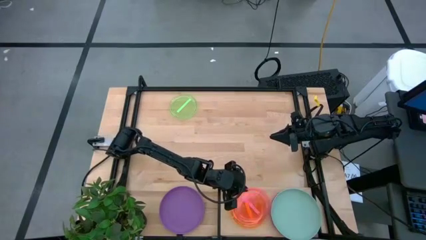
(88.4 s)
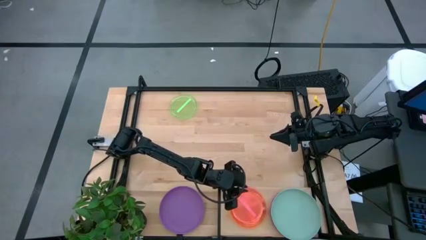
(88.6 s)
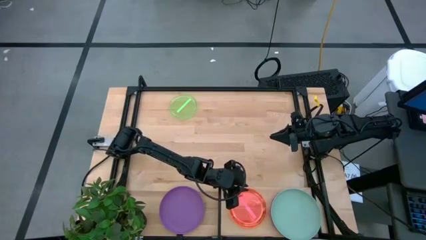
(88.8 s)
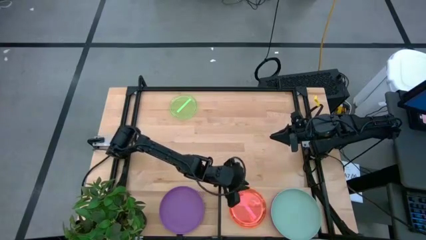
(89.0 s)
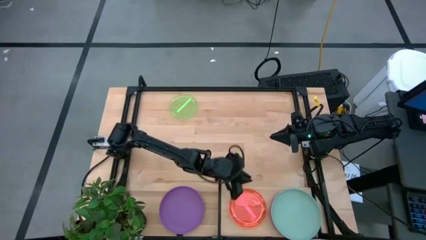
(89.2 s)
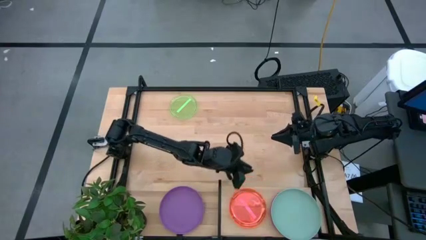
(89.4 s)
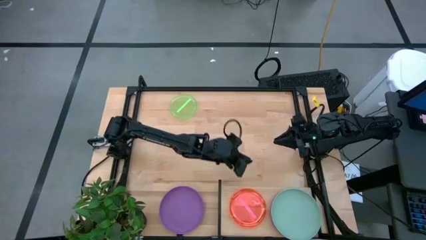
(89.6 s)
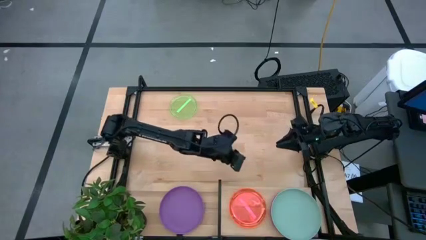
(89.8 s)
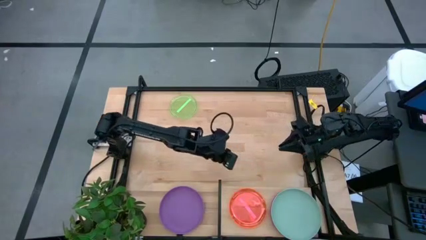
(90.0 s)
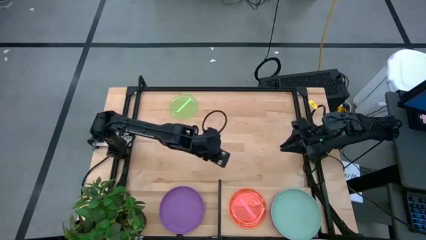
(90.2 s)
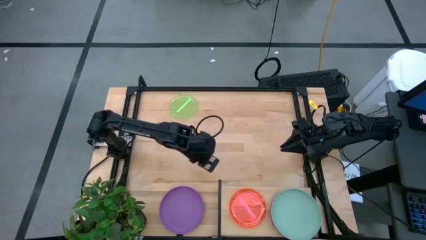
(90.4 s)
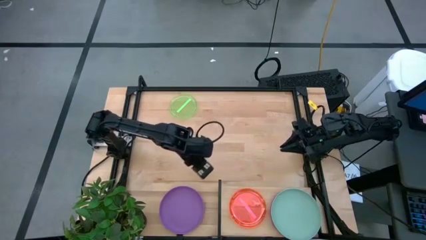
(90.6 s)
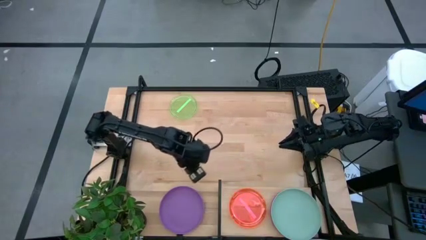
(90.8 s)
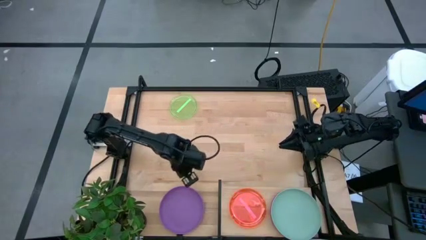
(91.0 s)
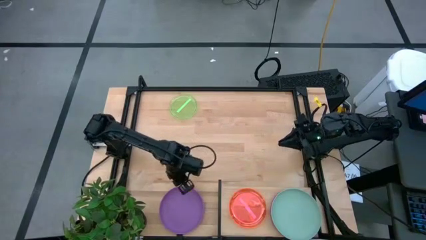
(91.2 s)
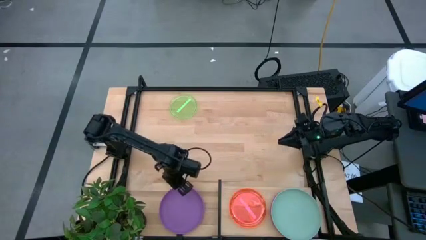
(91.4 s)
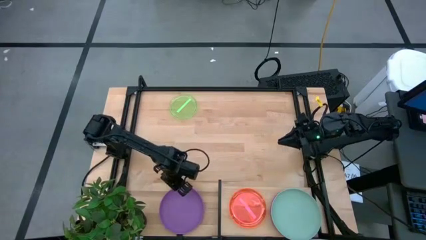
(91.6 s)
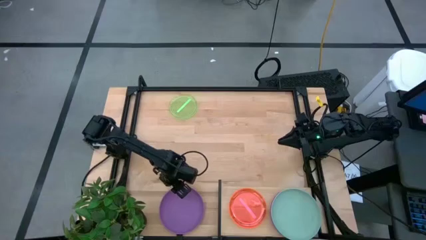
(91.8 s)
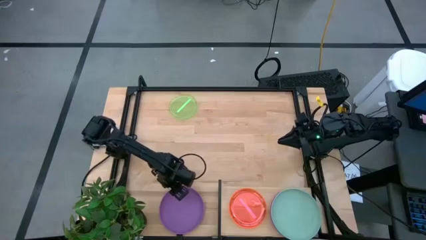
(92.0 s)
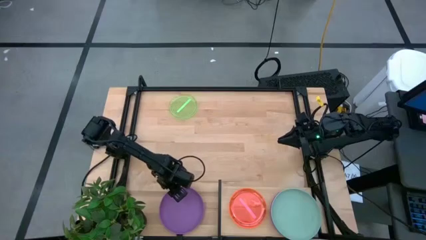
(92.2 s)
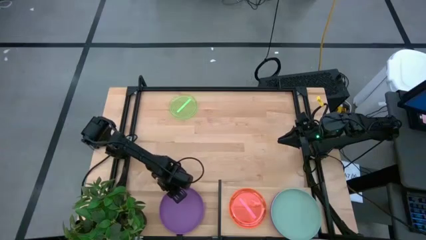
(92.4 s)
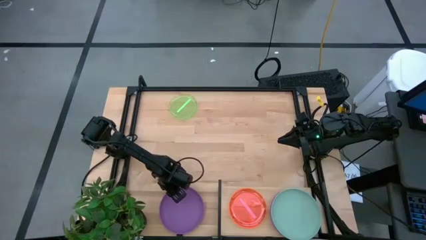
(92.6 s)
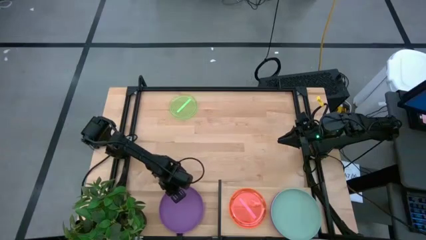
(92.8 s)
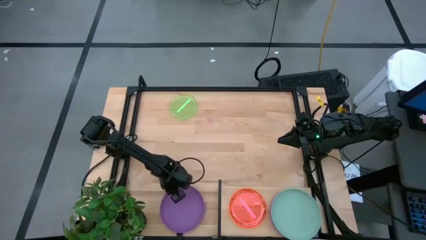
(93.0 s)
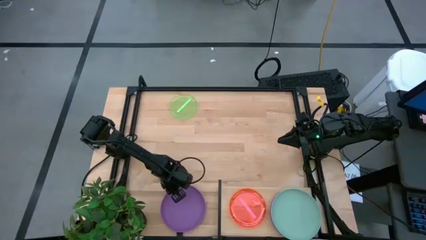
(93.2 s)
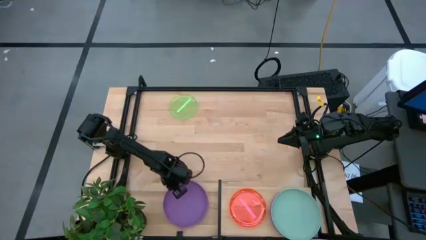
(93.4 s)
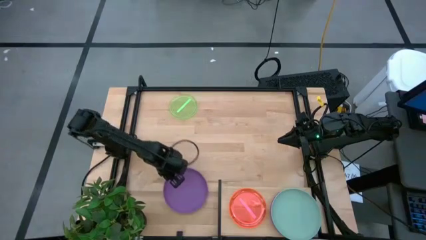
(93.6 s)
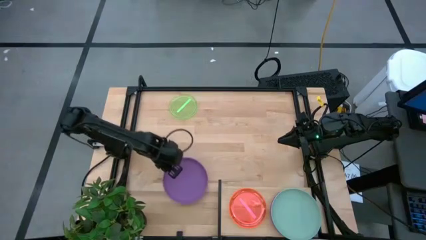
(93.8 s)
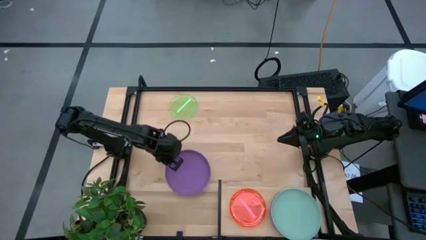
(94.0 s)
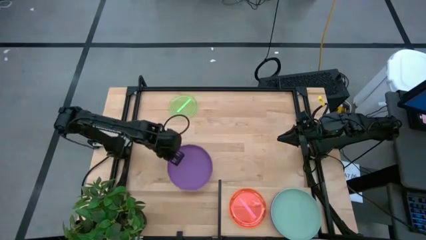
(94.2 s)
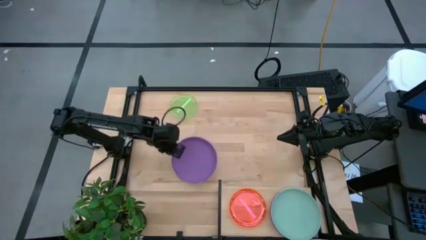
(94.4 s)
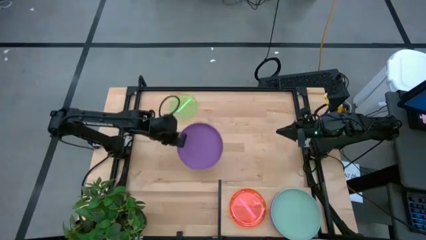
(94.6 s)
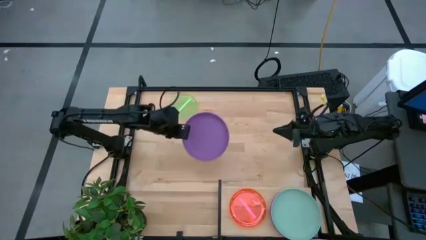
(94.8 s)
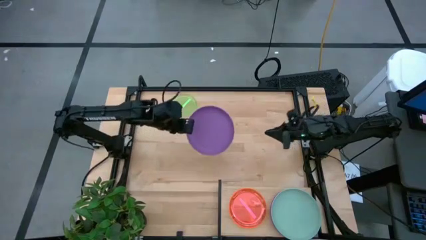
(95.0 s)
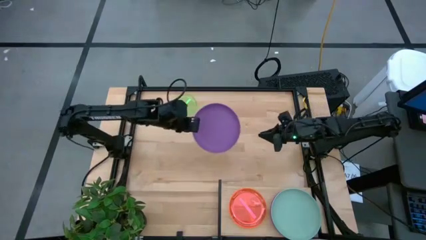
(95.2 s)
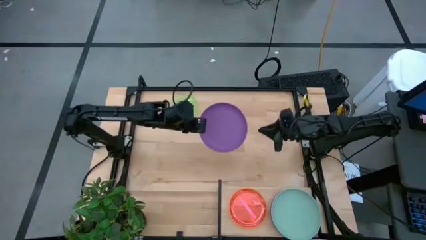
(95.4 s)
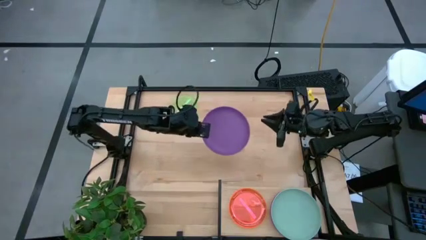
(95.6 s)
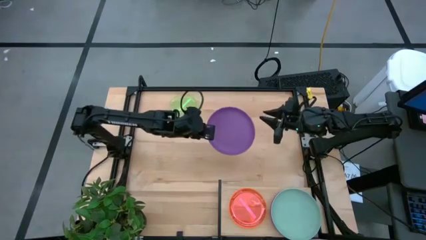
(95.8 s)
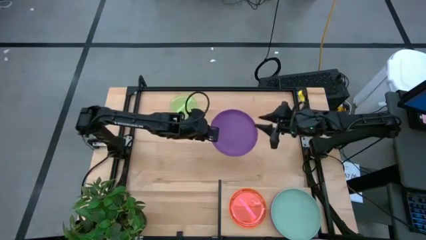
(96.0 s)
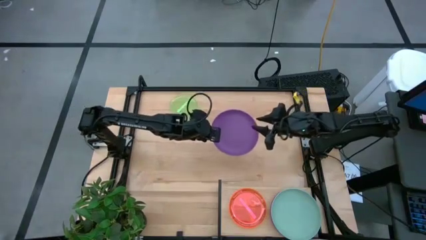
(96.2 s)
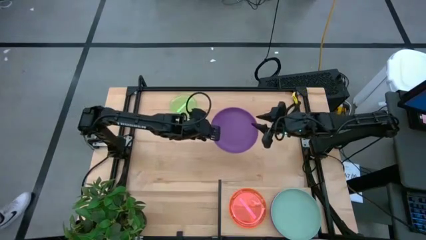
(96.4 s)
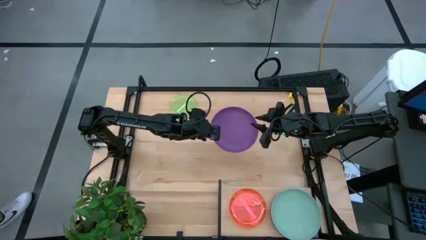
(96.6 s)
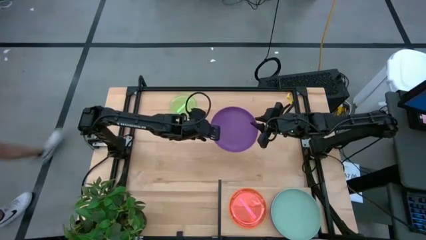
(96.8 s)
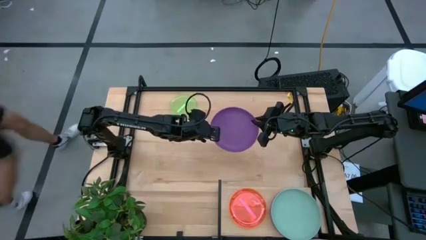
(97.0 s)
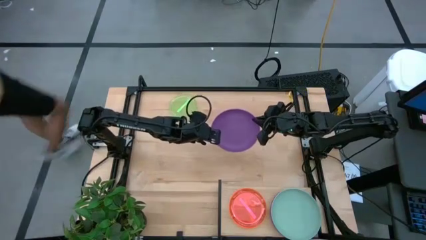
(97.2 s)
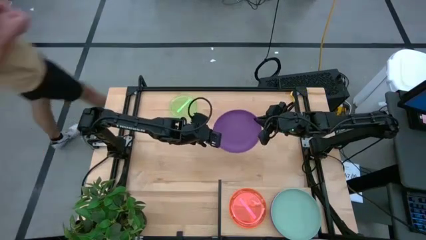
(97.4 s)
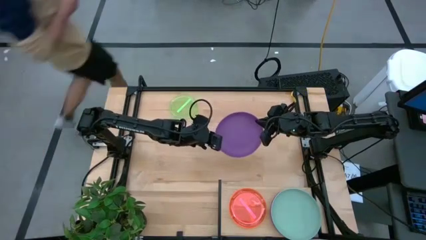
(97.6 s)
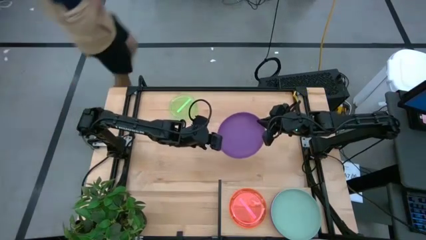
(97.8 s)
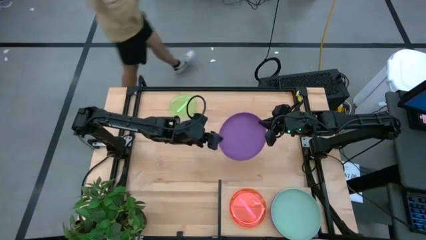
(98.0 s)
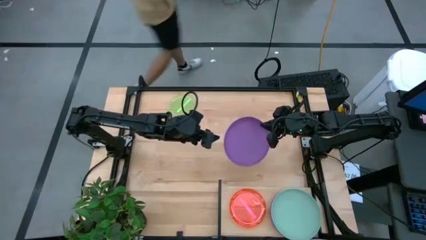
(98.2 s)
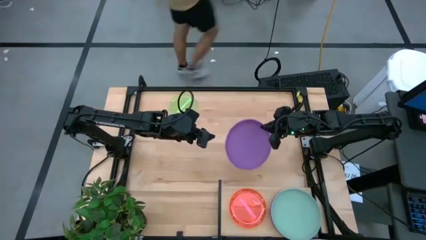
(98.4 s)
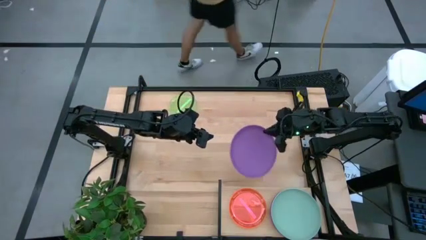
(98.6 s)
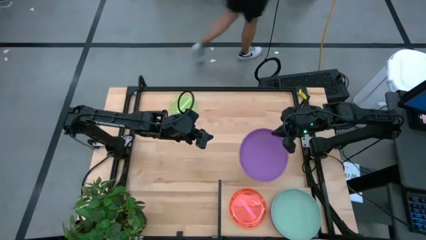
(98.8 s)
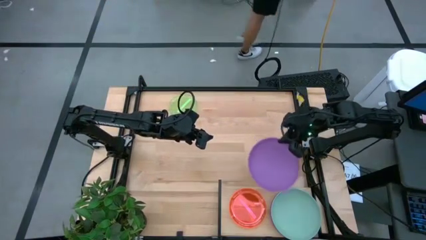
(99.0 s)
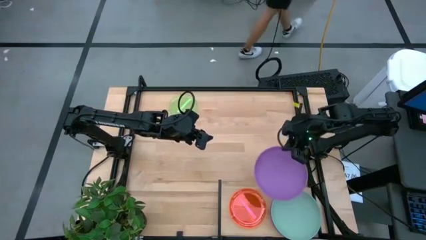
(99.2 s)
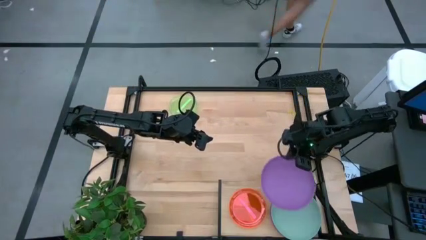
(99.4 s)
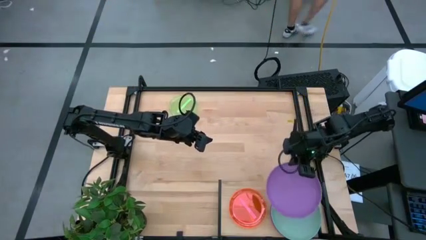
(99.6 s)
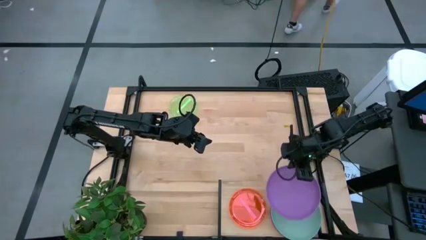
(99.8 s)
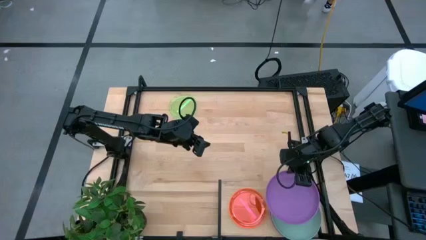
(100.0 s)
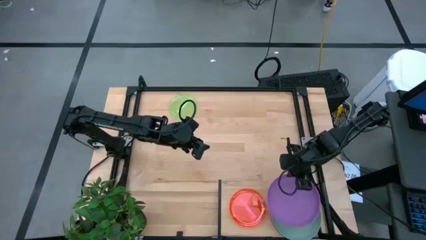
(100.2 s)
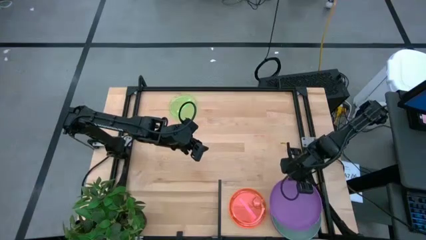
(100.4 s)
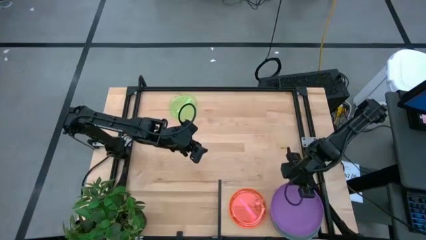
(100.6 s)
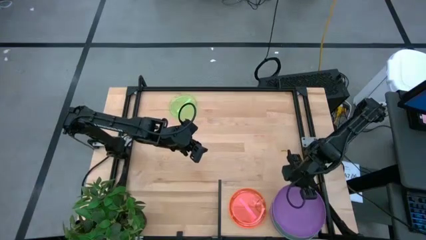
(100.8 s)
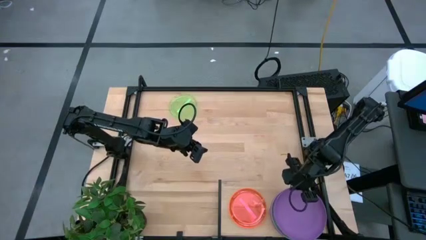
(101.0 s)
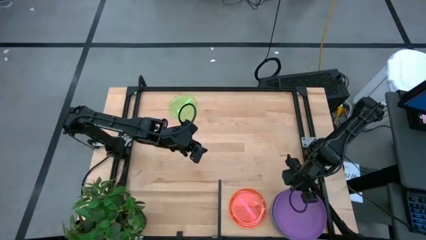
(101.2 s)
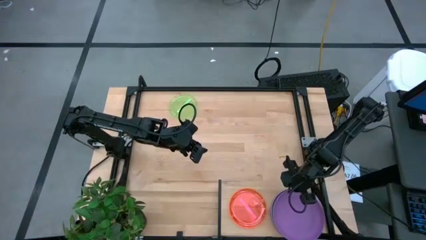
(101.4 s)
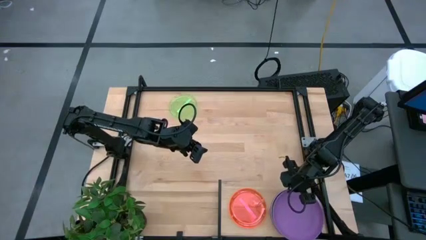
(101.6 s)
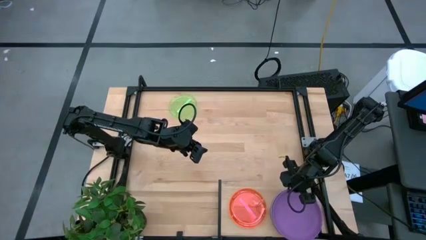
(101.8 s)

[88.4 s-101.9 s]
Task: Place and stack plates onto a shelf
Stack the purple plate on top of the blue plate on the shelf

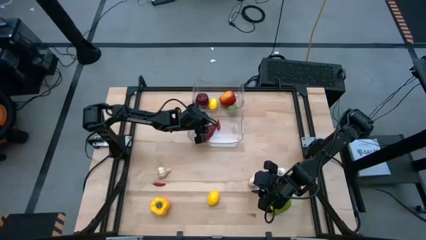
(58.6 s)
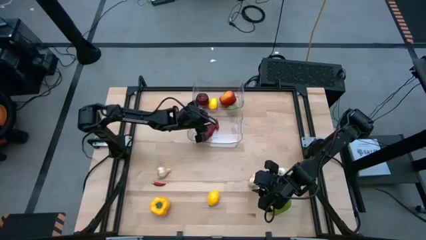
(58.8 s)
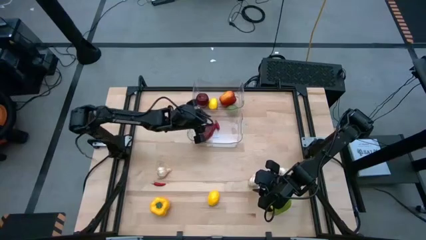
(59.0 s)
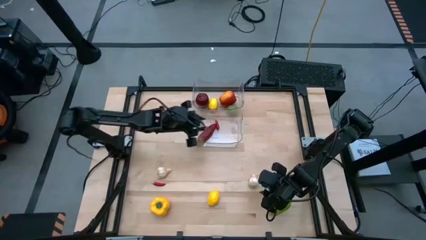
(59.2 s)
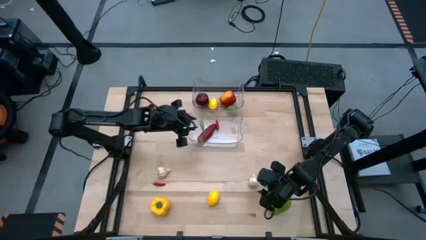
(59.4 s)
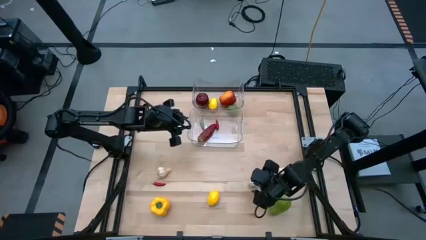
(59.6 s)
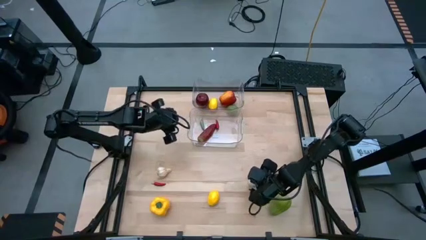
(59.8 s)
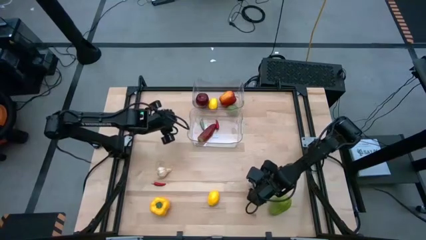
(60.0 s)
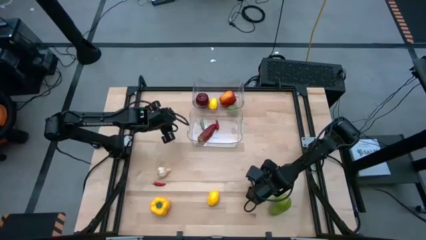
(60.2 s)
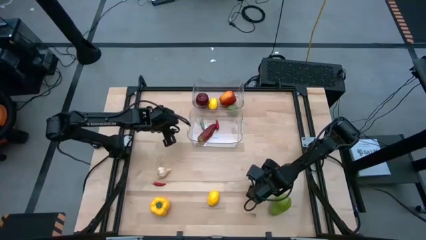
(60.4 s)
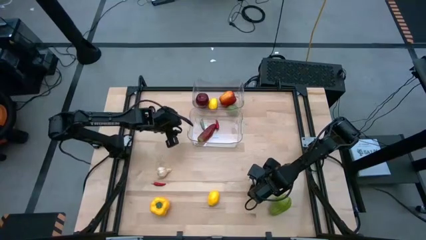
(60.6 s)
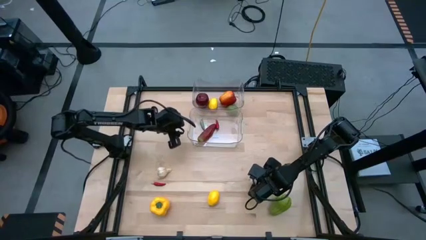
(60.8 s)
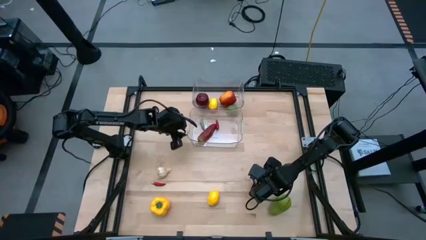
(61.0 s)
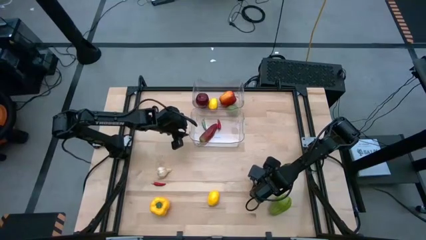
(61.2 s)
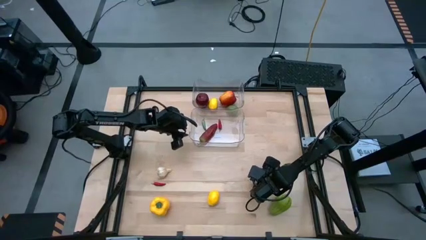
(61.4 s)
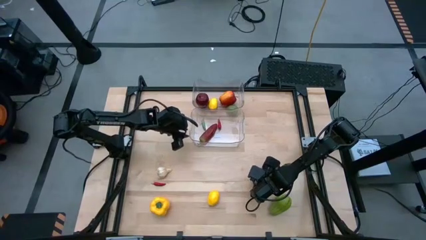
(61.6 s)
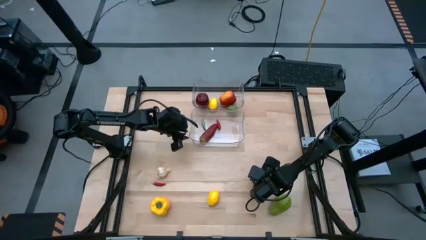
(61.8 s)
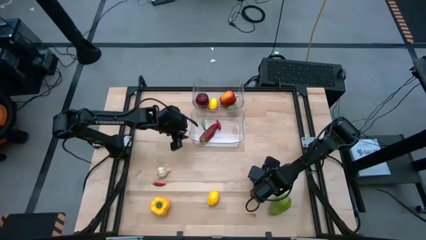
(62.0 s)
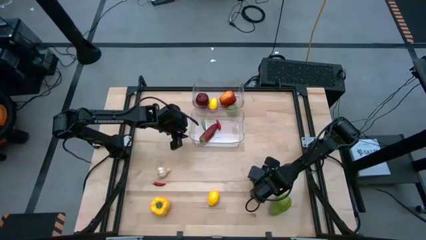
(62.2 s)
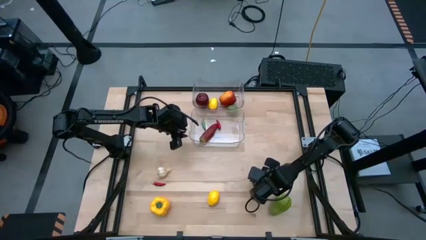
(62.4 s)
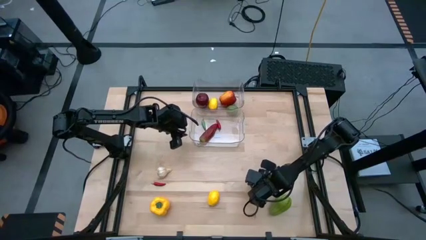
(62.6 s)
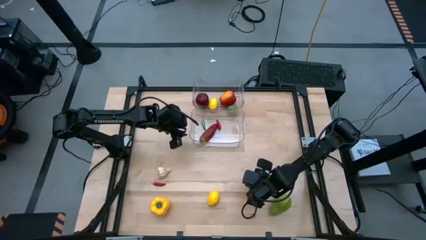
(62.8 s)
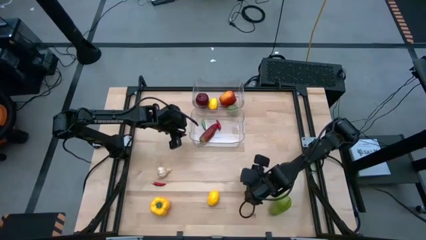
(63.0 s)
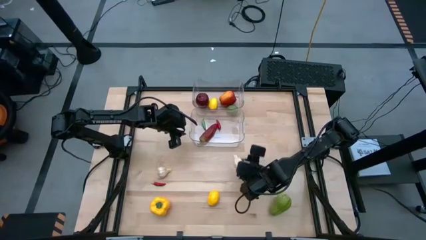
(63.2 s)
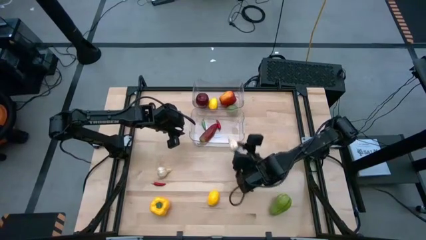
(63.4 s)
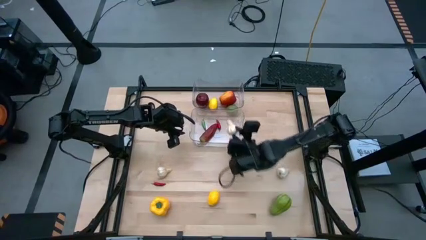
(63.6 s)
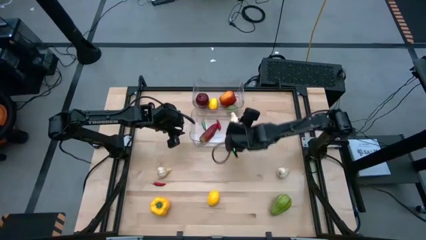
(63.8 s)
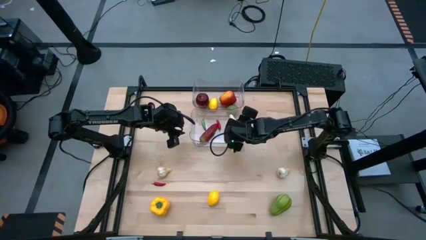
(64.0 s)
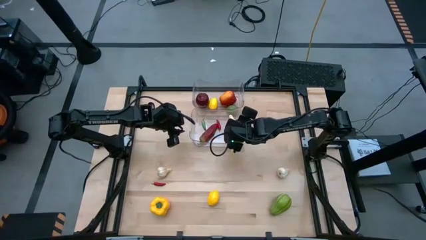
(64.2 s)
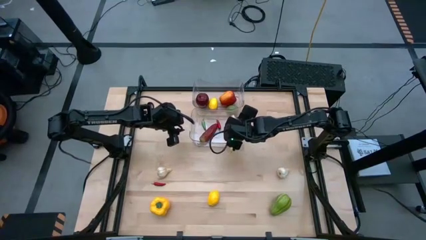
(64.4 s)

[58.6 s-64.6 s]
Task: Sort produce into baskets
Put the middle garlic into the bottom transparent bin
